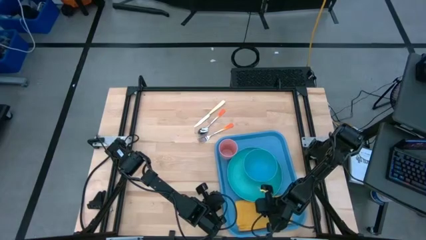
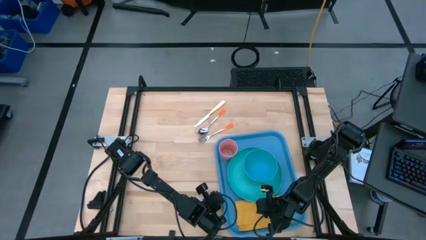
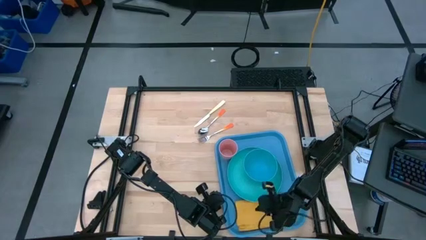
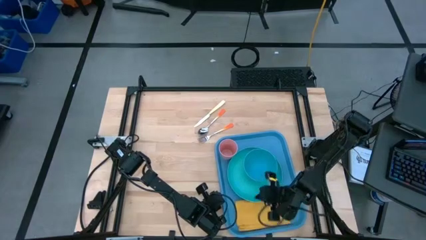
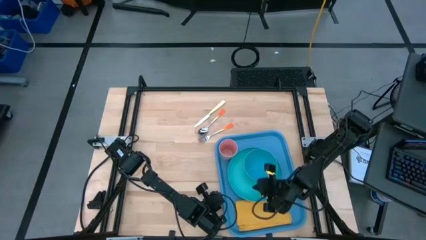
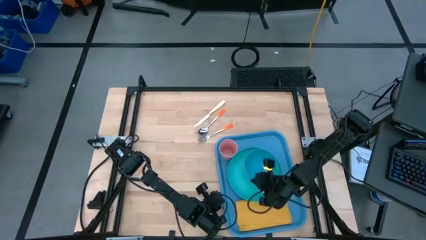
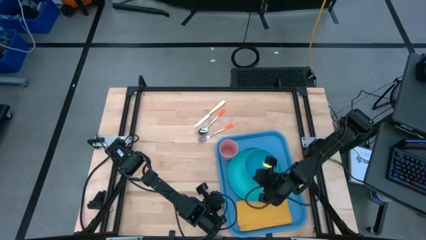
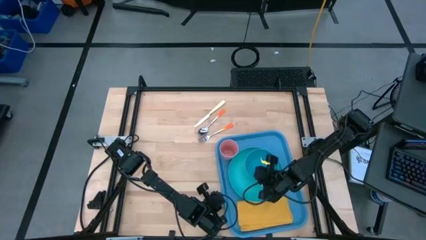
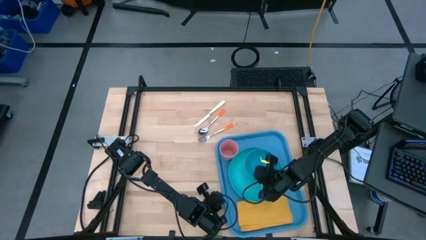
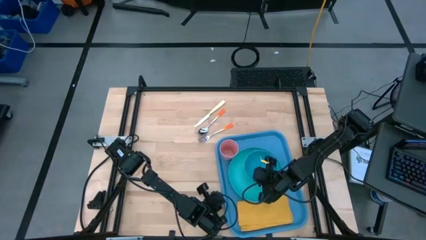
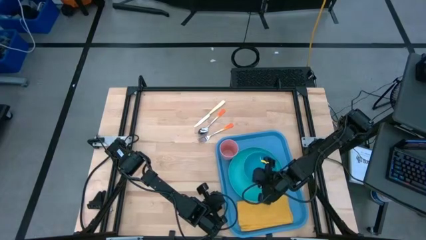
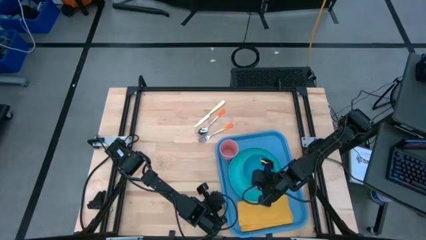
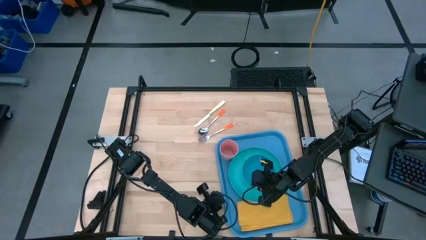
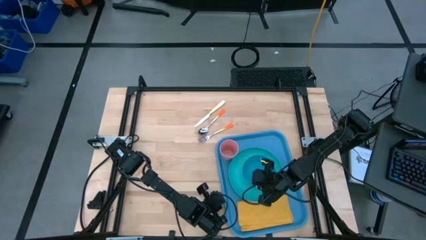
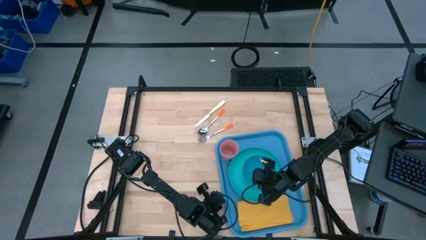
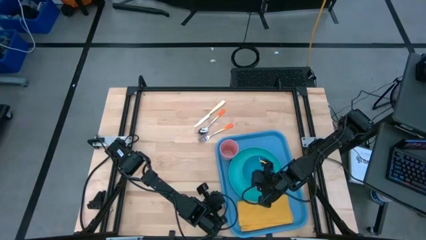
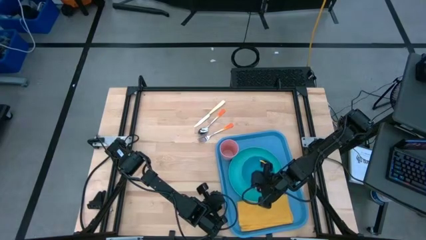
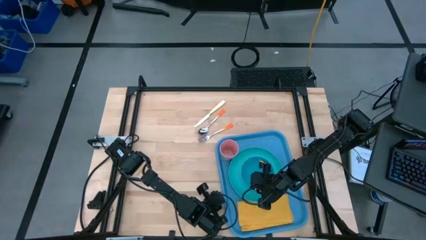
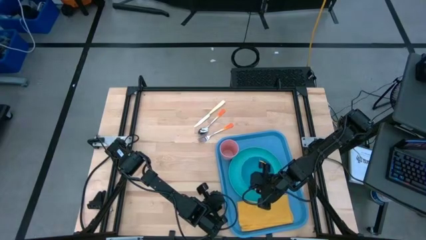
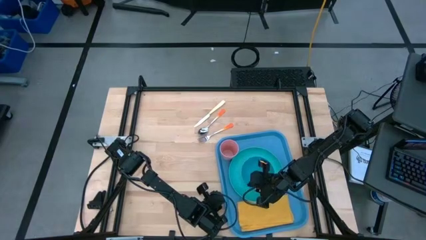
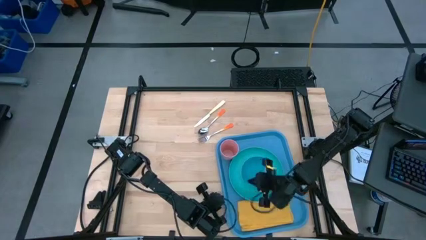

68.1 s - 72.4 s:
Task: Set up tray
Adjust the blue bowl on top of the blue plate

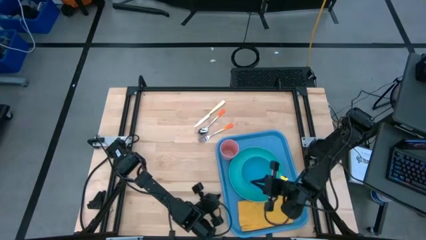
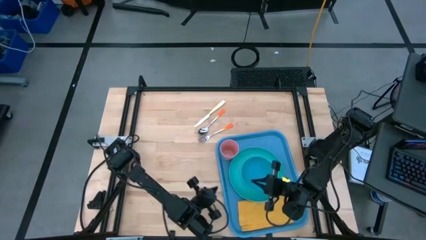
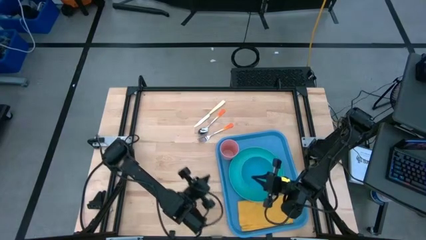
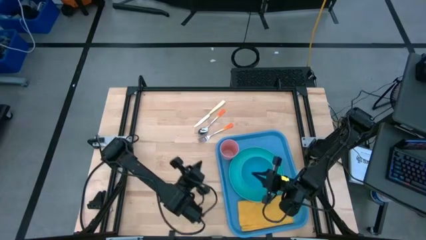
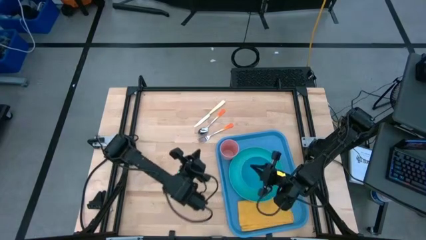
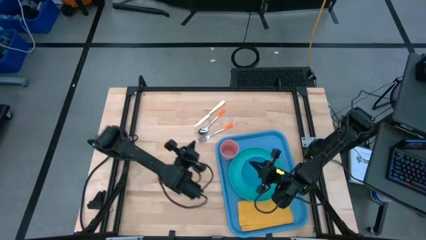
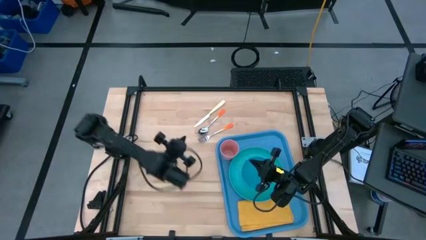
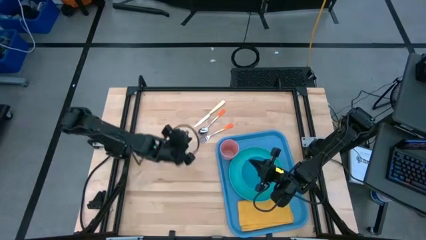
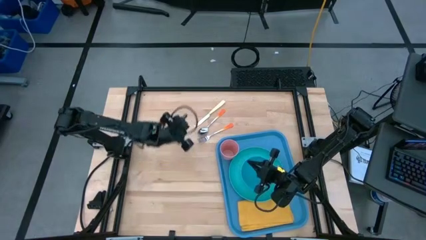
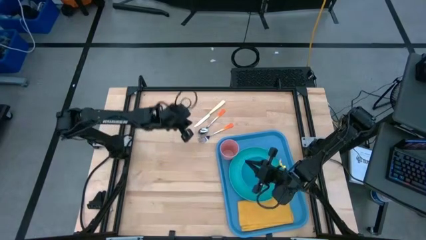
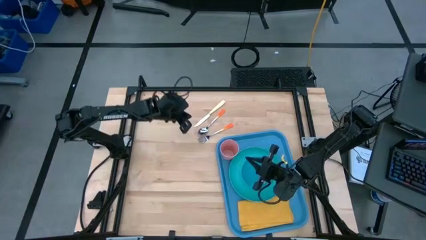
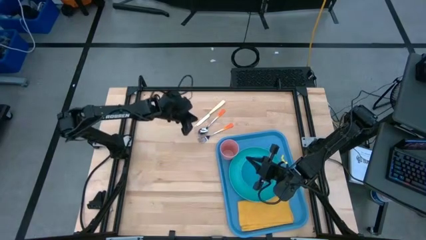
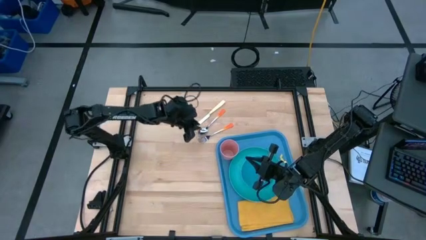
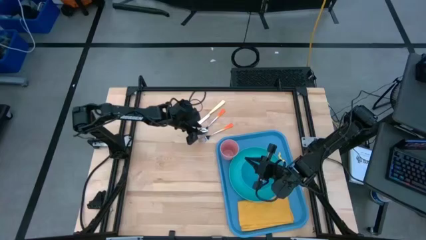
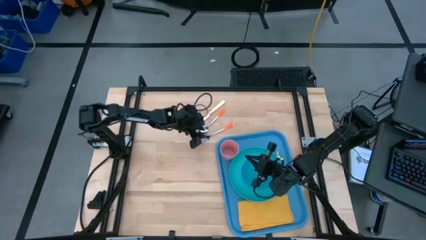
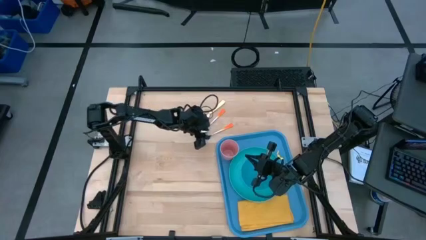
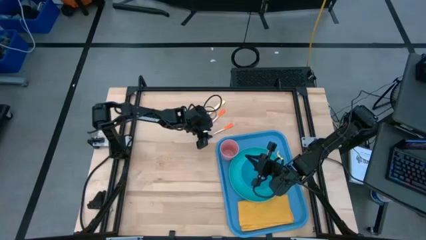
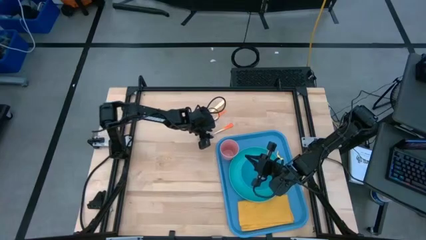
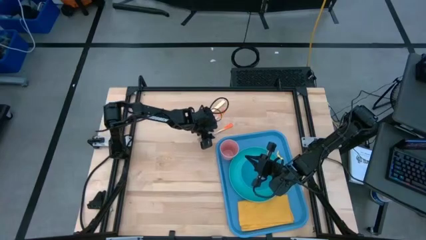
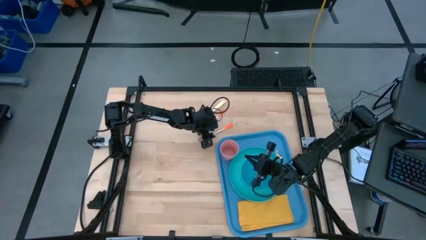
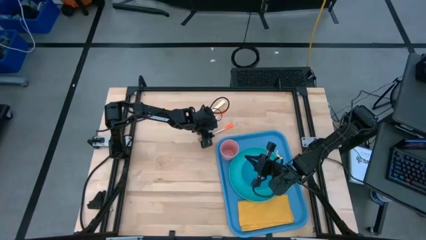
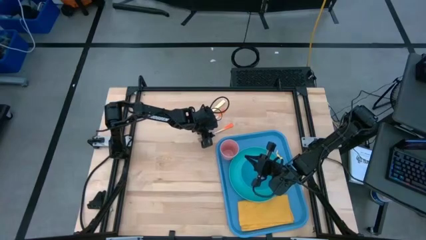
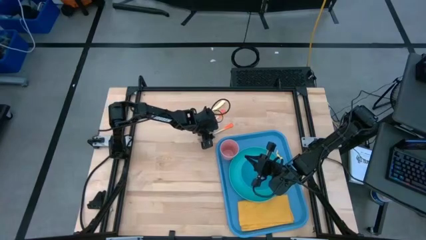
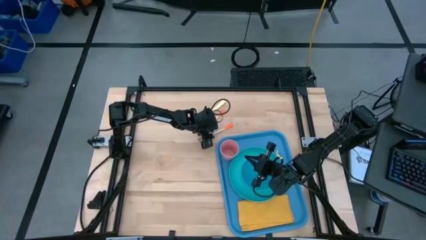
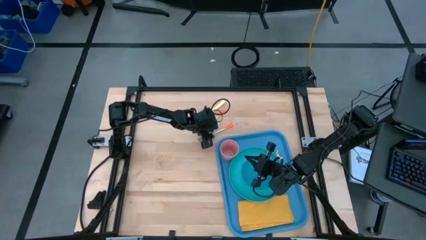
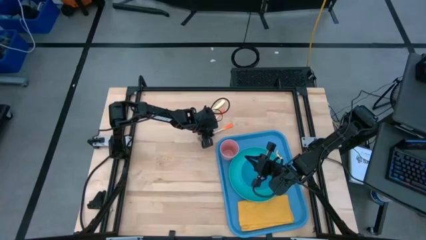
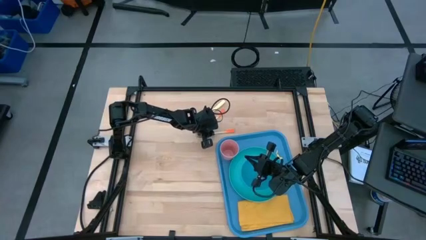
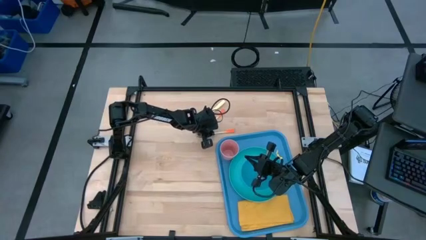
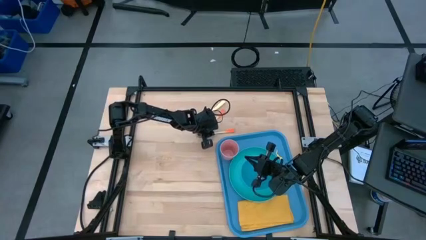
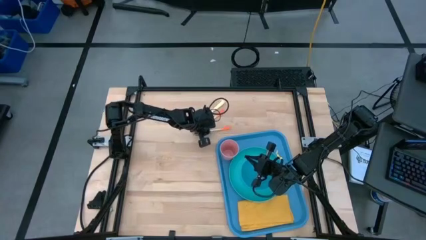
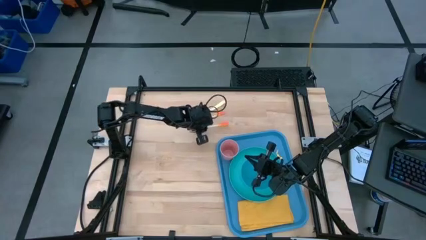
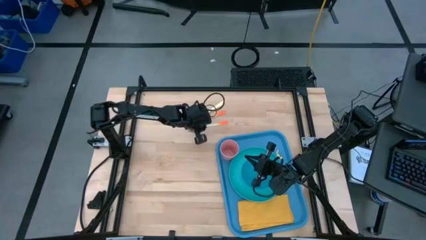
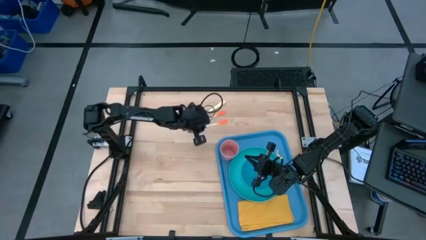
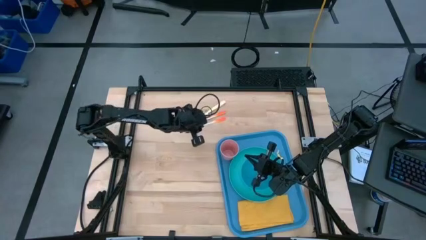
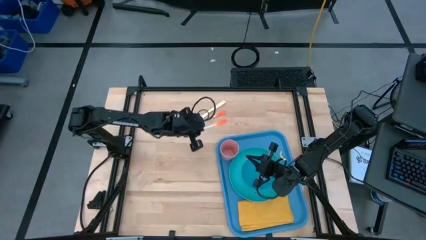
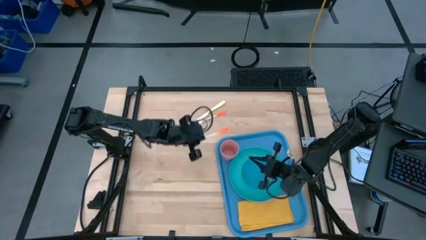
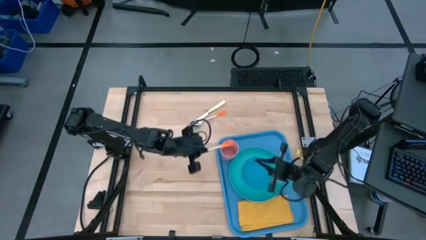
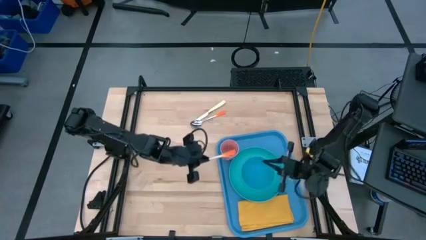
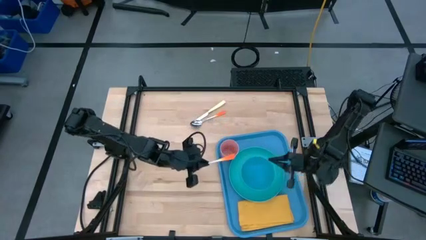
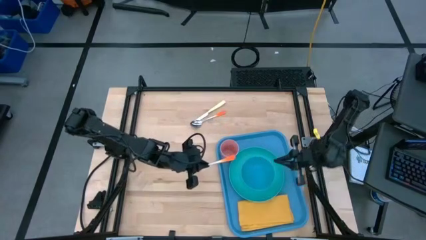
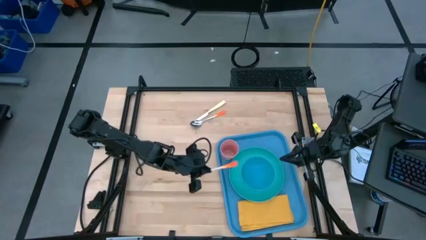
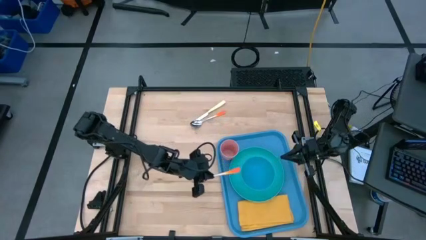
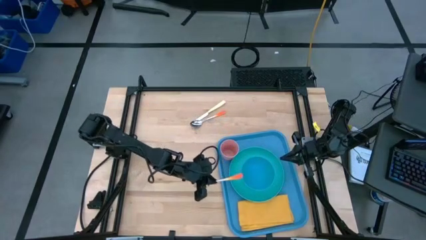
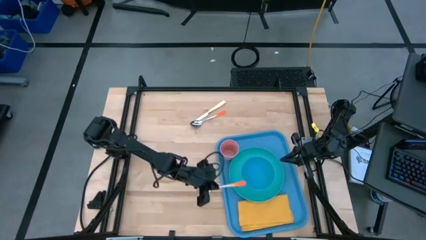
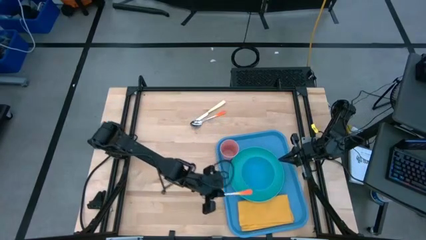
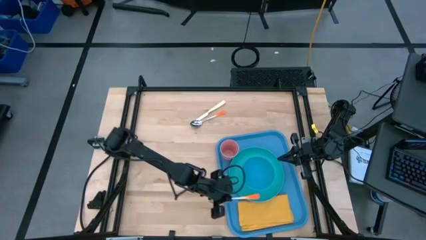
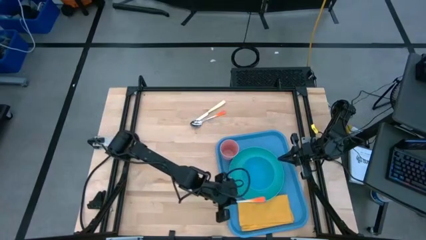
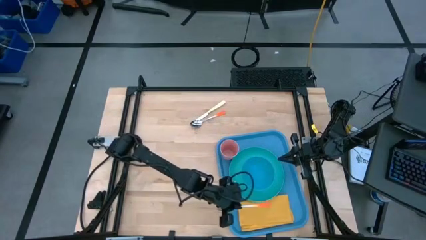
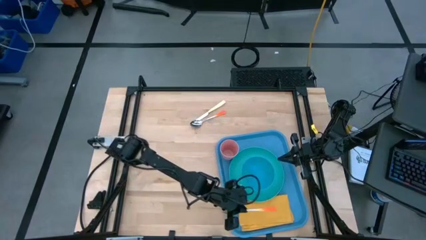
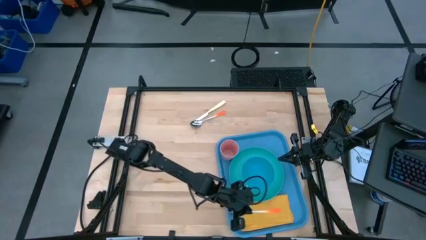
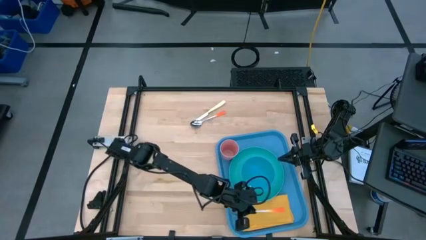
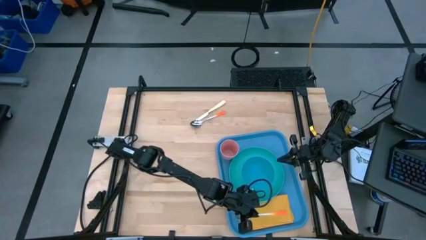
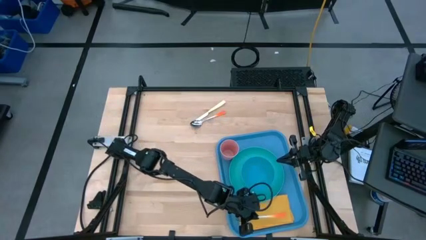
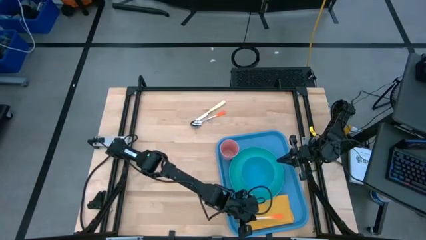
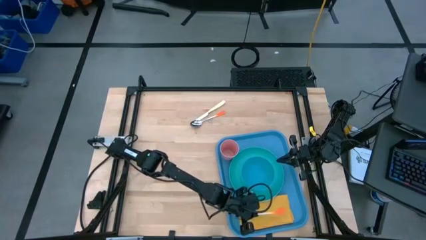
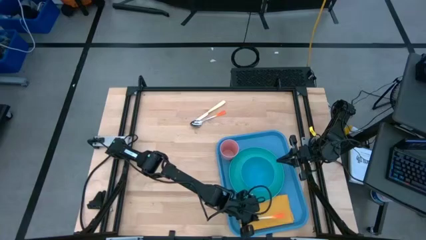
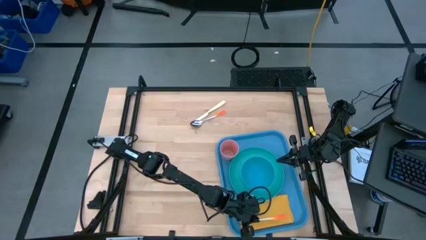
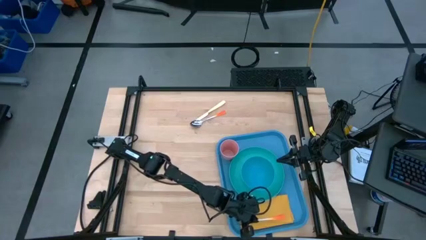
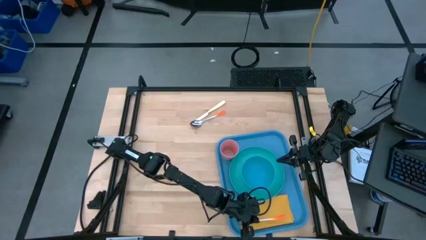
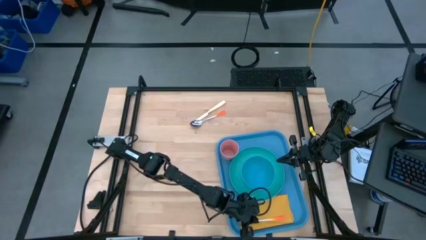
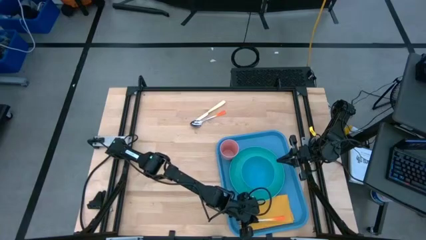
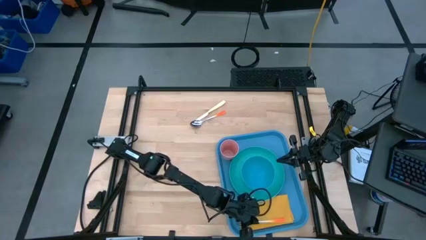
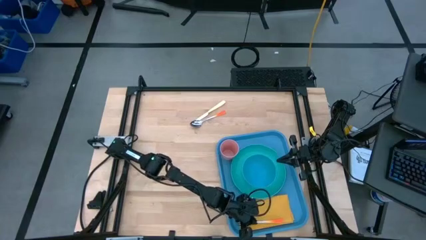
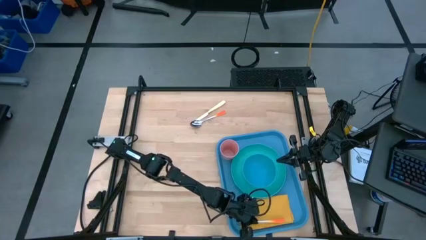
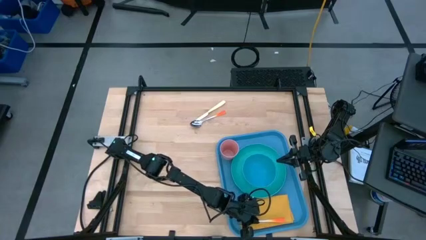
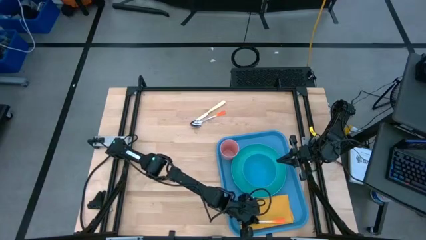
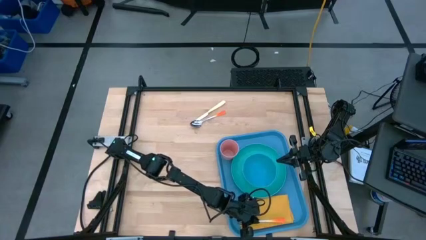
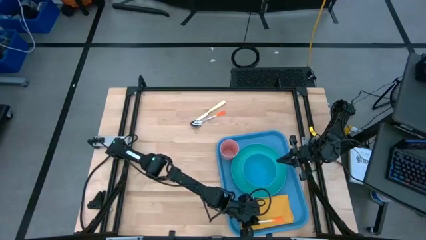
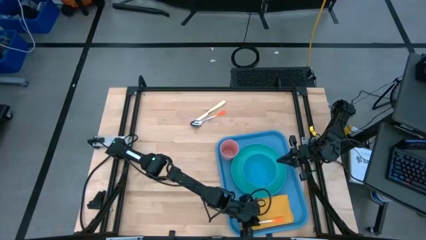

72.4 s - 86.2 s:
Put the orange fork on top of the yellow table napkin on the blue tray
